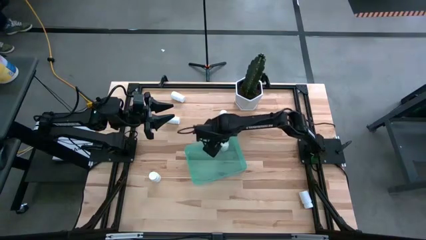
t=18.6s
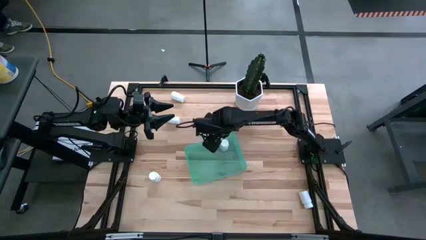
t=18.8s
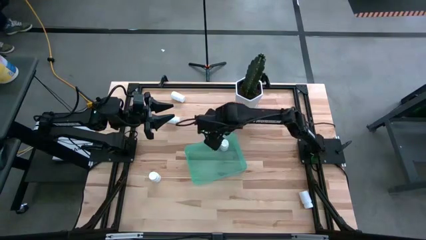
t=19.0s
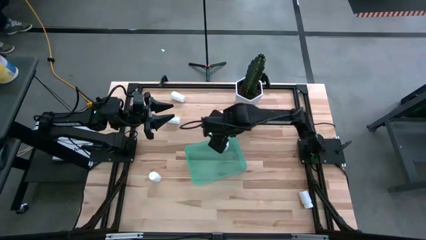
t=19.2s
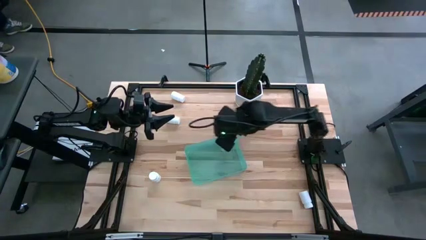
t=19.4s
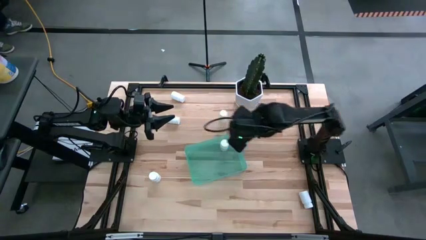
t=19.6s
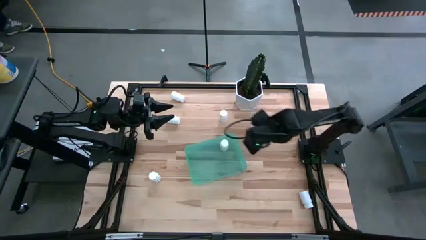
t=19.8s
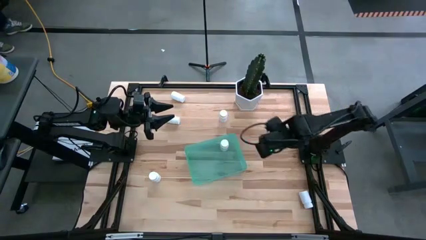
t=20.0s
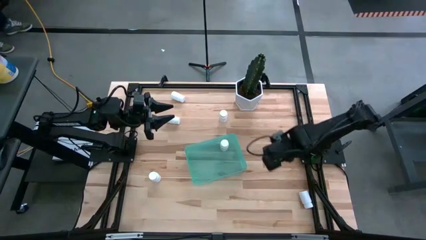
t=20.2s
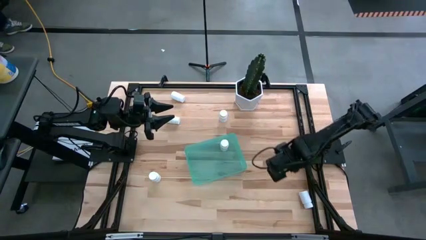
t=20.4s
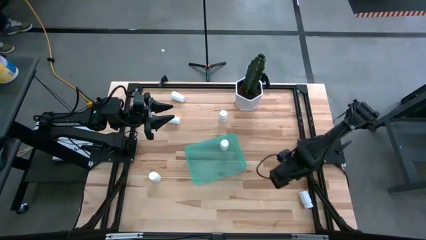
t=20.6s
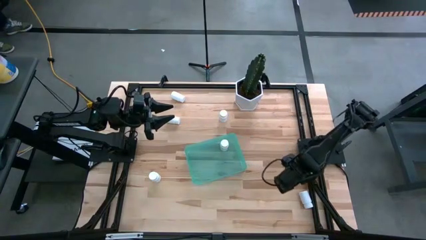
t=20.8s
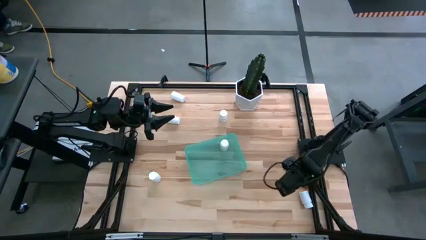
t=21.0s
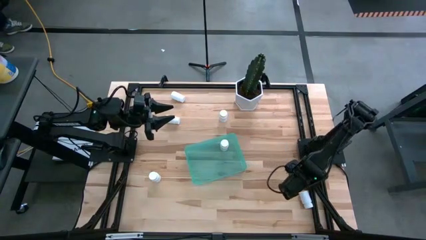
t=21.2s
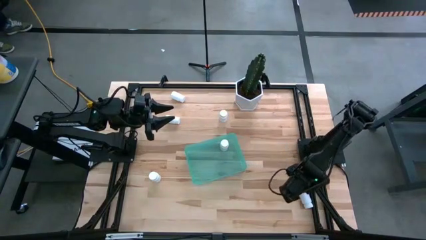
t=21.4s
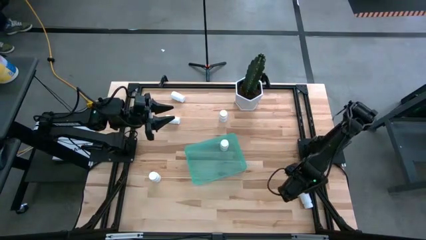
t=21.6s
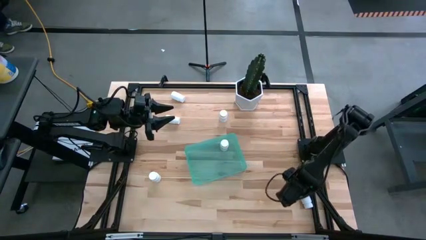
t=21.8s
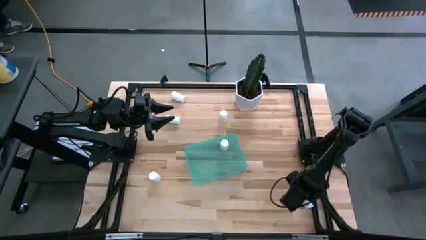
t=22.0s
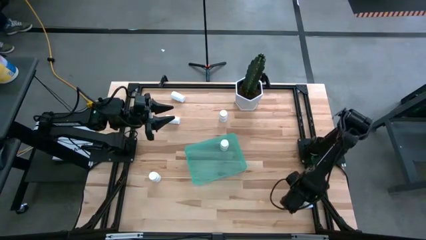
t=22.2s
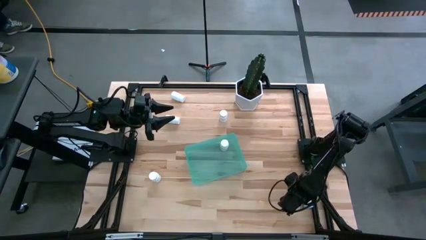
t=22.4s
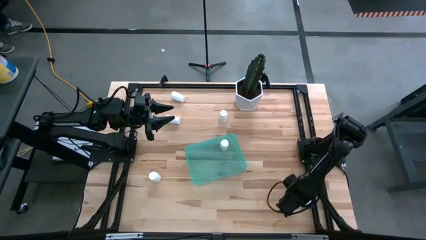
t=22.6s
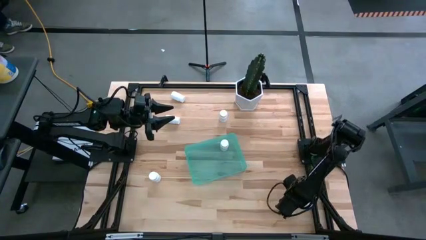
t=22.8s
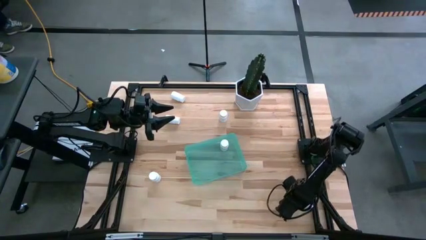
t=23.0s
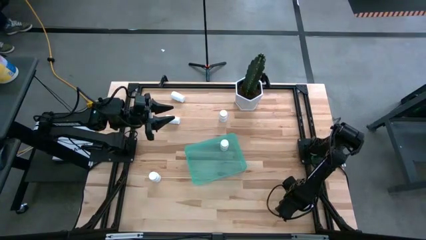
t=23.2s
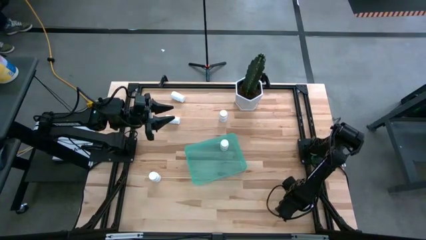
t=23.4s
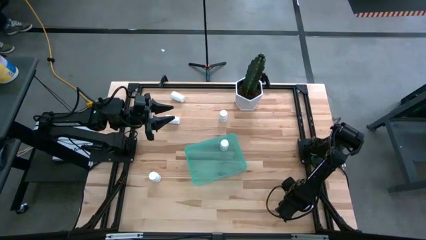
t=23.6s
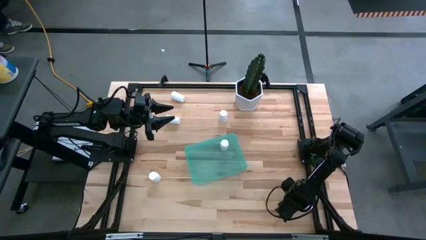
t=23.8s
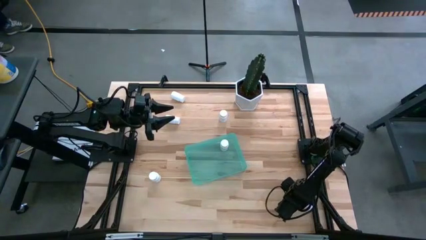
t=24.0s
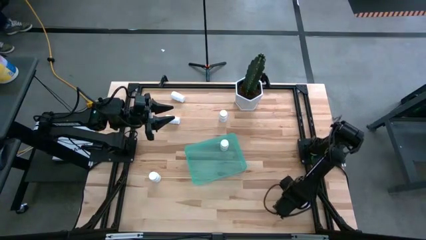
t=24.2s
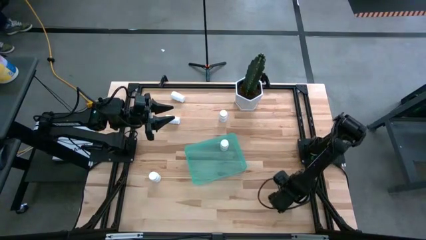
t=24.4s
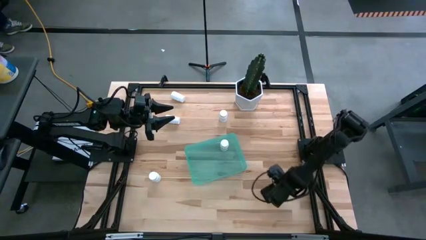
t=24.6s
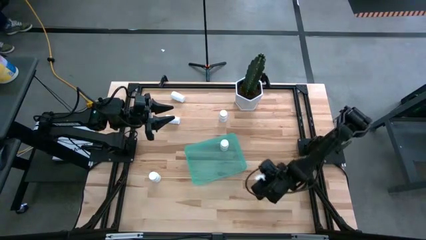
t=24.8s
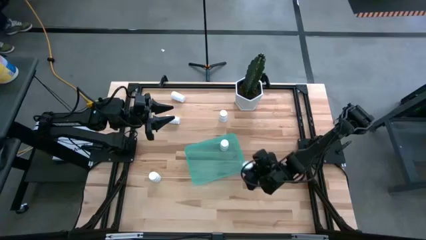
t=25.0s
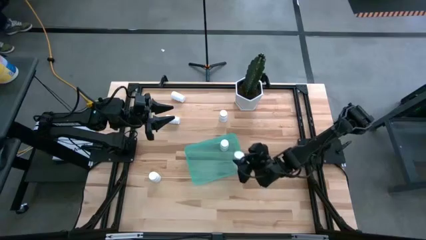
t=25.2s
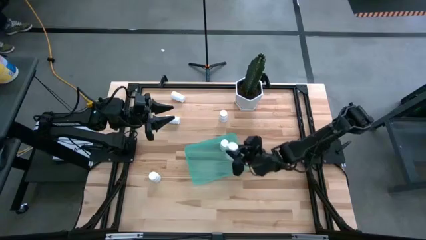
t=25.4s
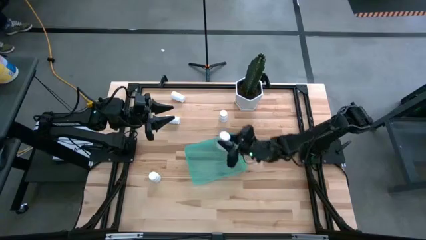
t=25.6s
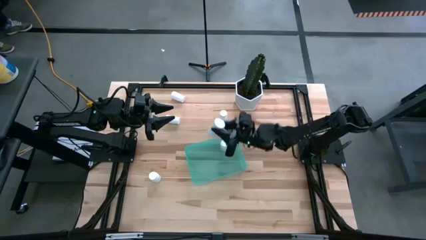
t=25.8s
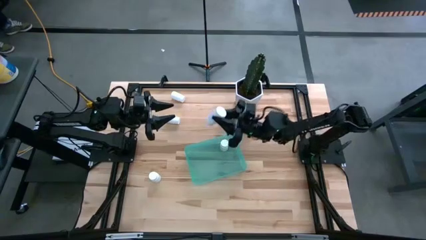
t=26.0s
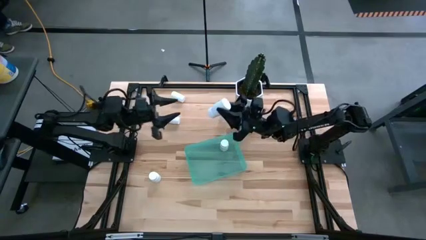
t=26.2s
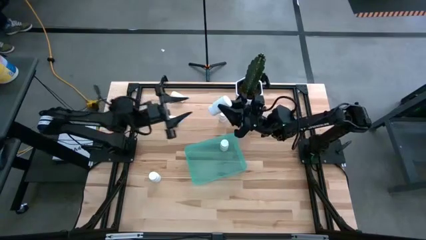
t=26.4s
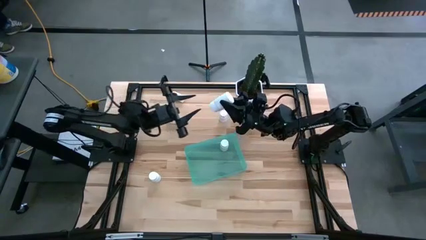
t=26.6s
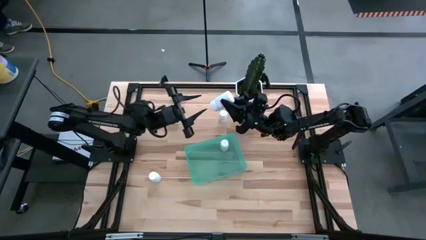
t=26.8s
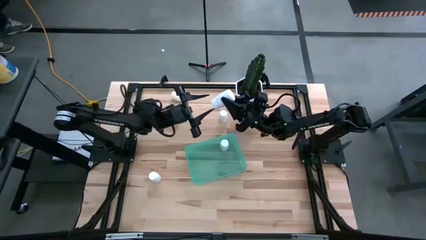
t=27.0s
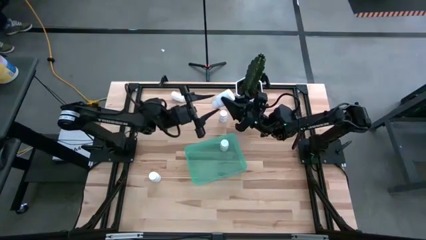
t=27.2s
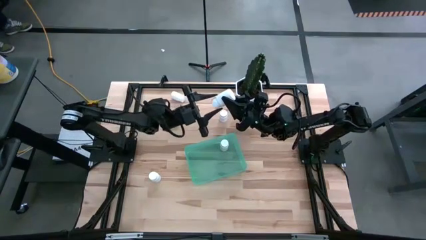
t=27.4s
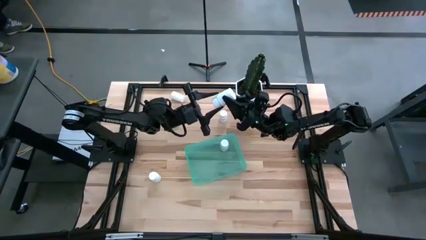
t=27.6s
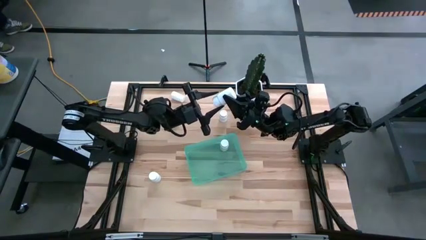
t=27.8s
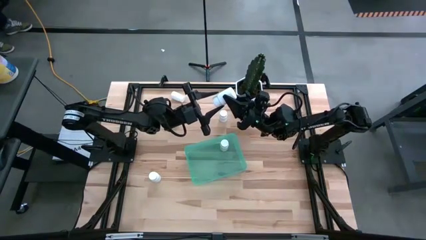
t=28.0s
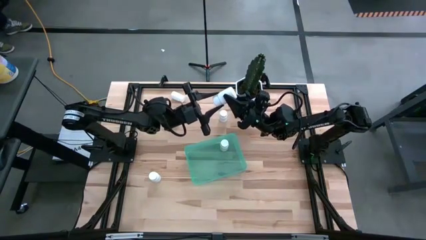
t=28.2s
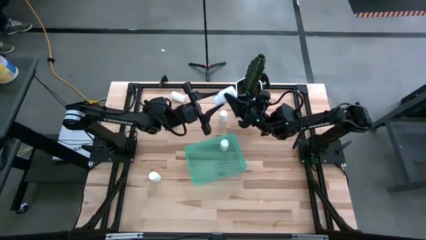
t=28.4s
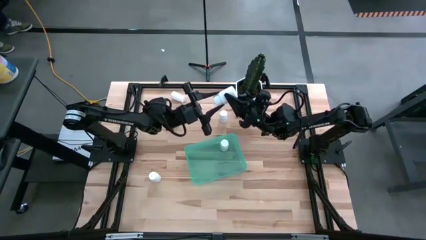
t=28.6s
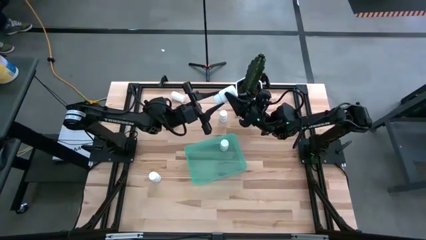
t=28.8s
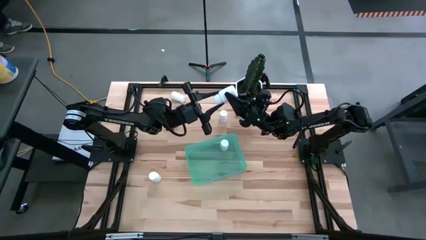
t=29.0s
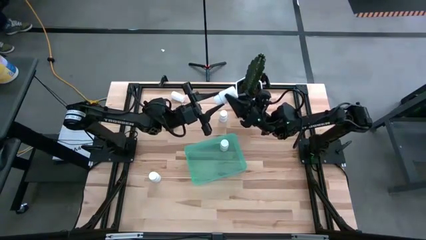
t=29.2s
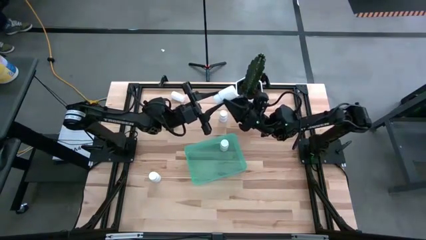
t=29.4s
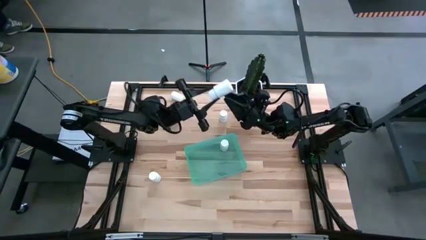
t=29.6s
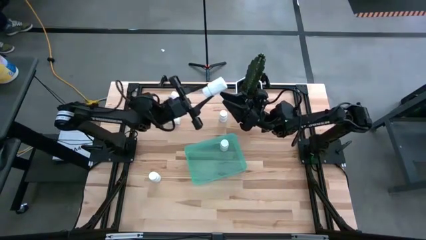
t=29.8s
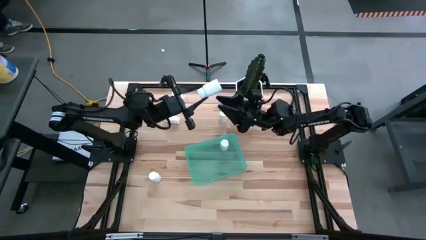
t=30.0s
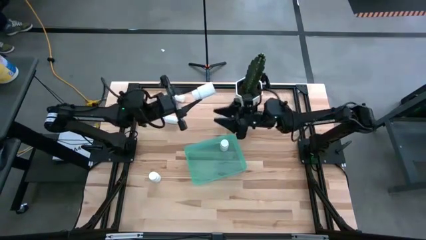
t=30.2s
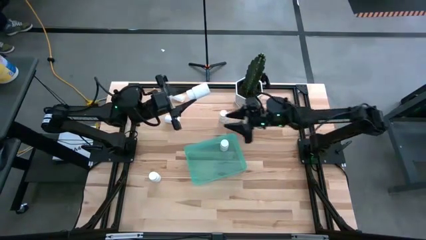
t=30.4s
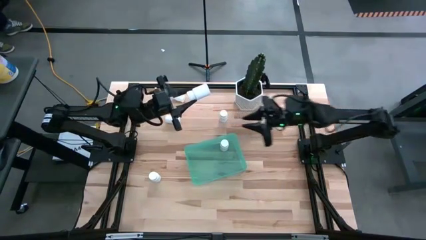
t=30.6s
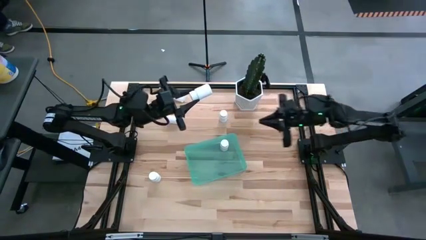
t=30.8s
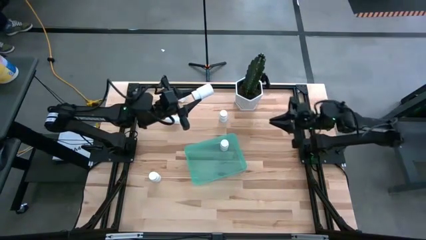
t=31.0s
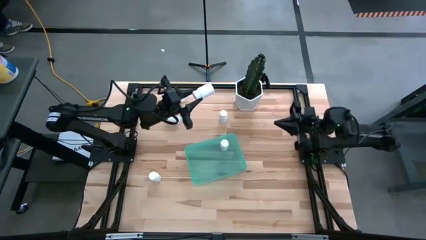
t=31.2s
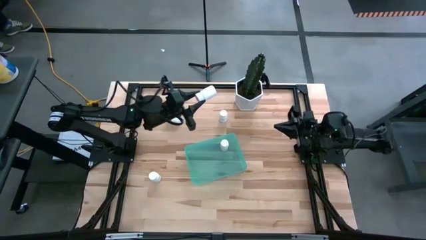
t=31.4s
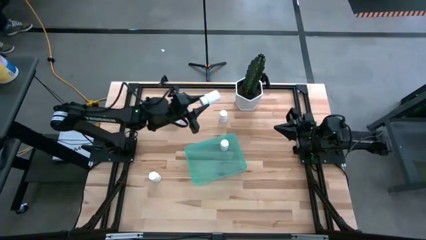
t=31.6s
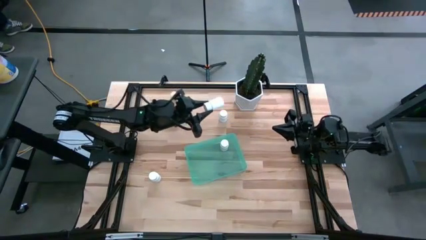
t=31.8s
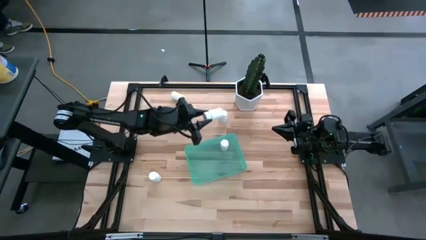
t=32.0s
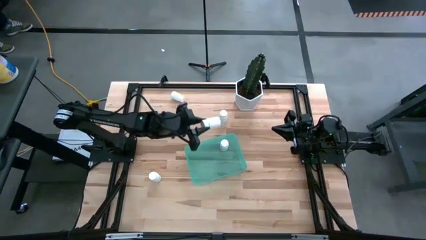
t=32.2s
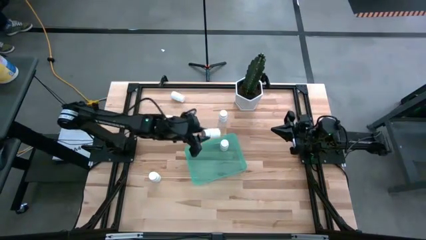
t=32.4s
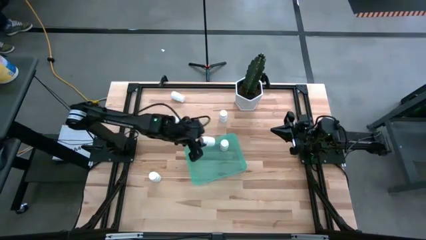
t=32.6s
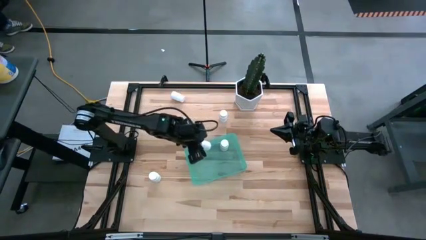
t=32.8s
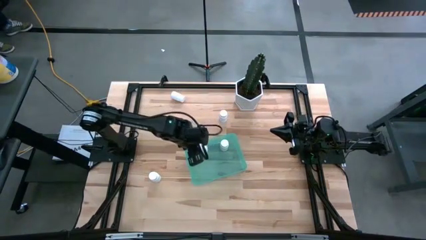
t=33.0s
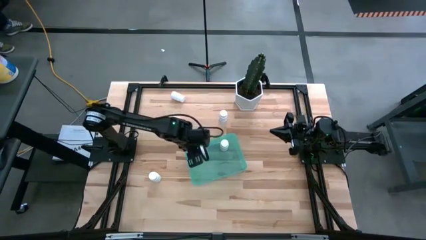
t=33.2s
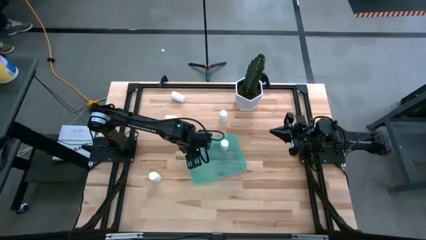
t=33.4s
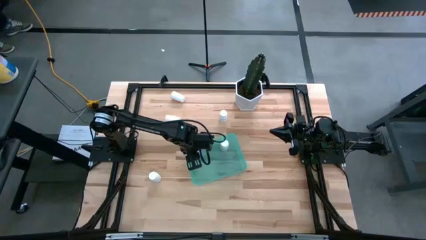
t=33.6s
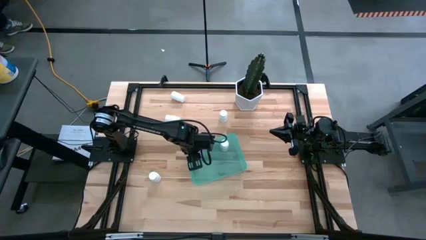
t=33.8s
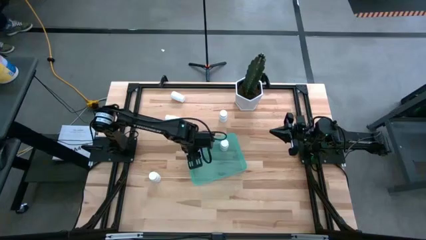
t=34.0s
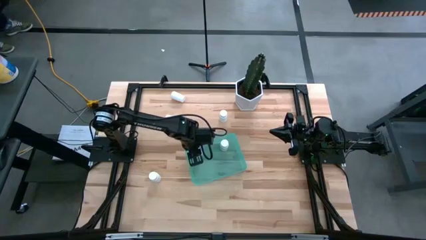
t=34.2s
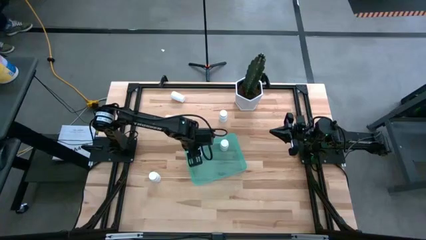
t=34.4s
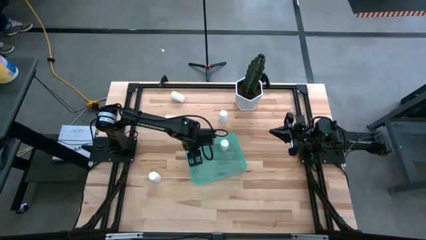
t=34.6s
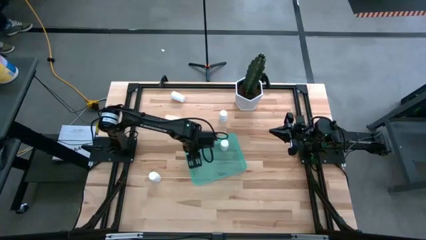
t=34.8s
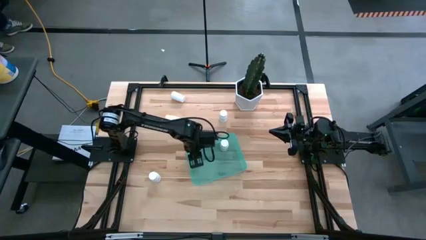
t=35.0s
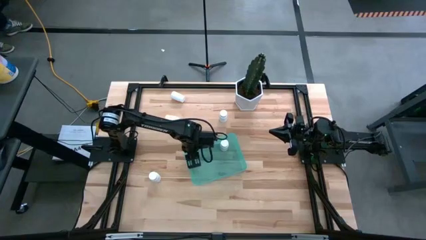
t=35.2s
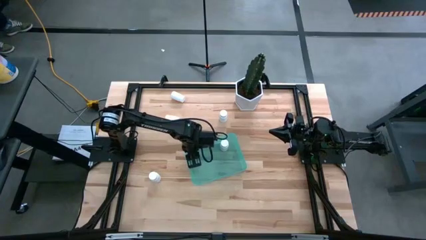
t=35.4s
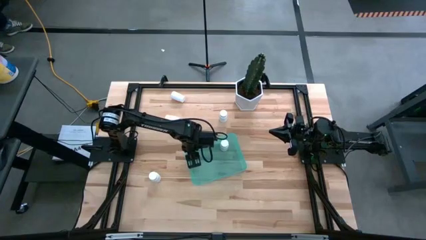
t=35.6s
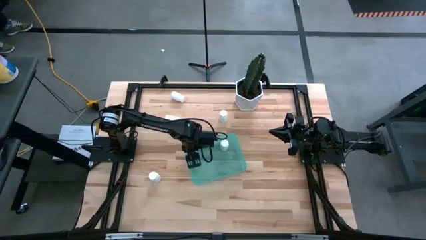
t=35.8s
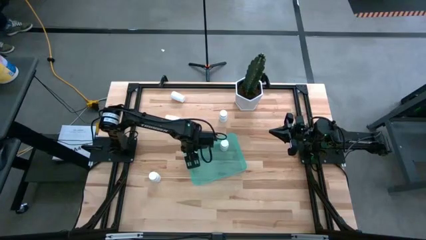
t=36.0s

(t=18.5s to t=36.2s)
Task: Pick and place pill bottles into a basket
Put the white pill bottle into the green bin
